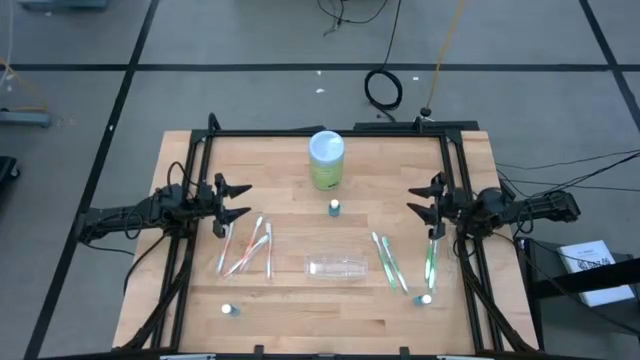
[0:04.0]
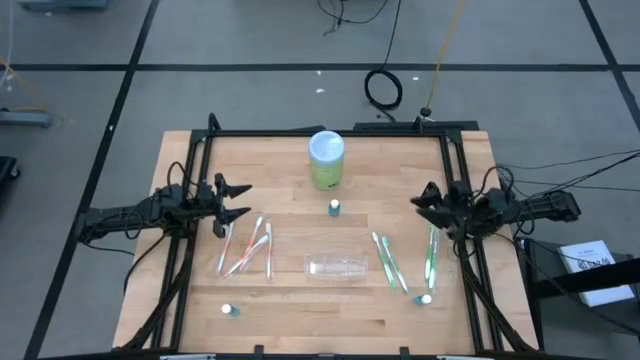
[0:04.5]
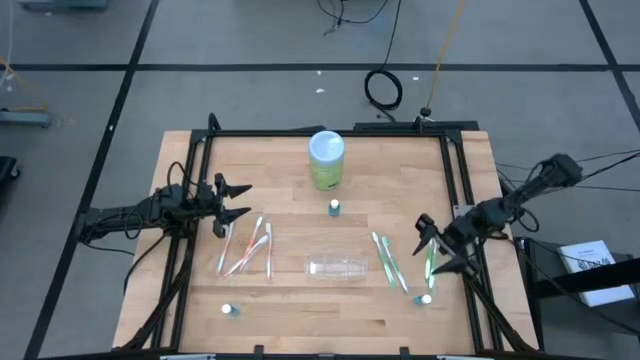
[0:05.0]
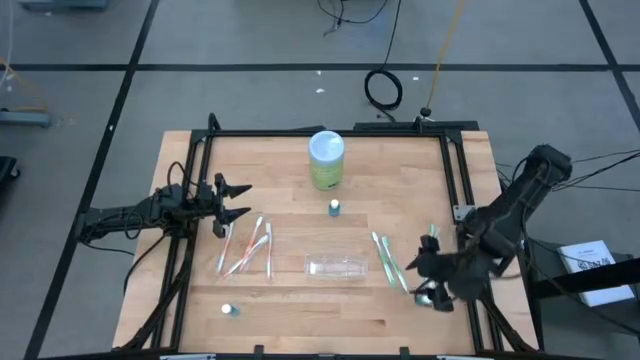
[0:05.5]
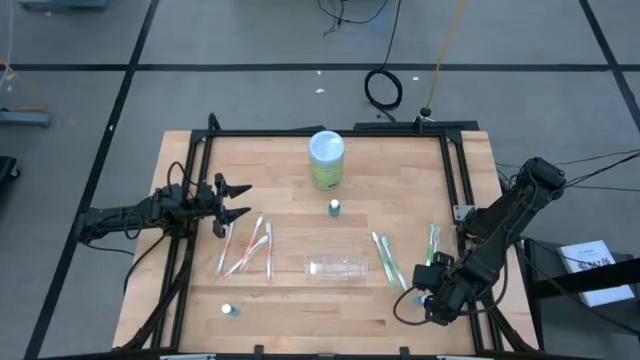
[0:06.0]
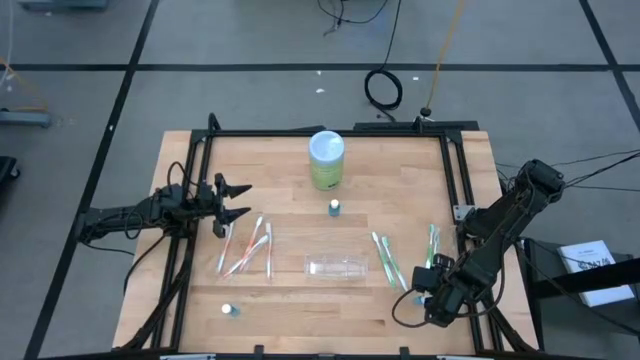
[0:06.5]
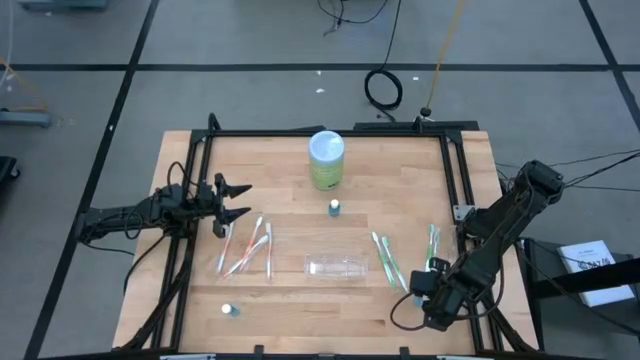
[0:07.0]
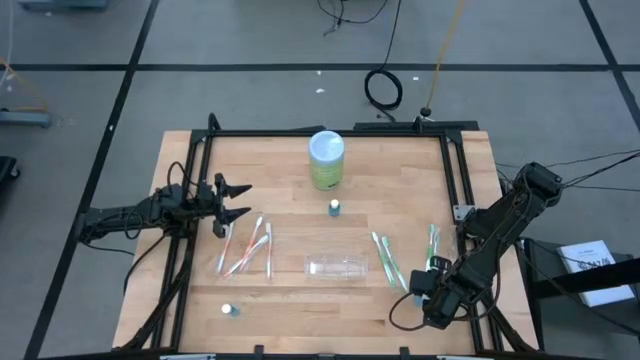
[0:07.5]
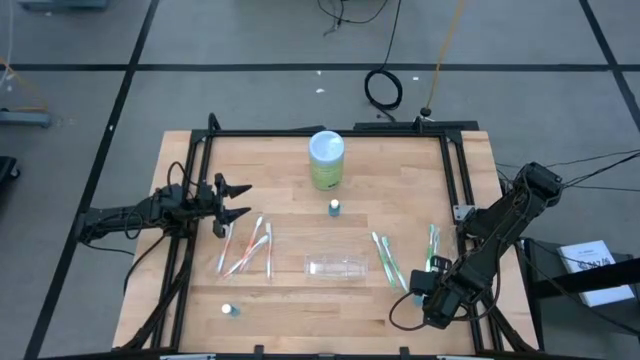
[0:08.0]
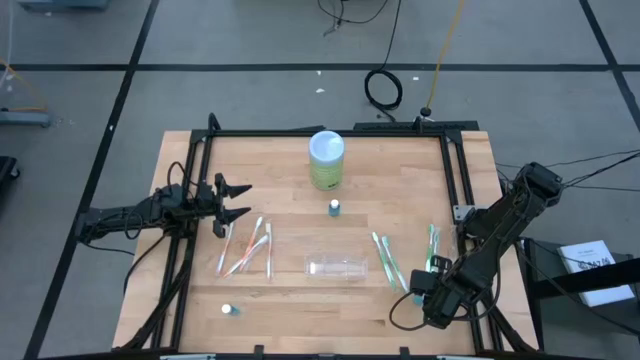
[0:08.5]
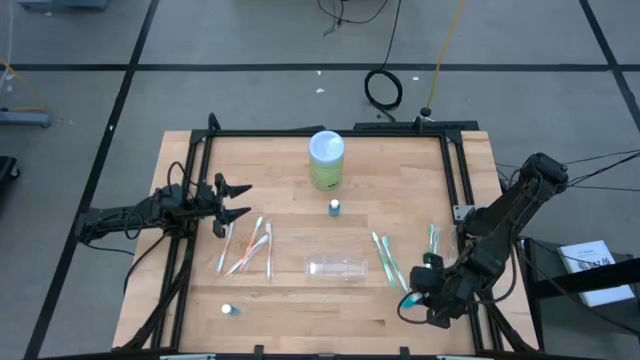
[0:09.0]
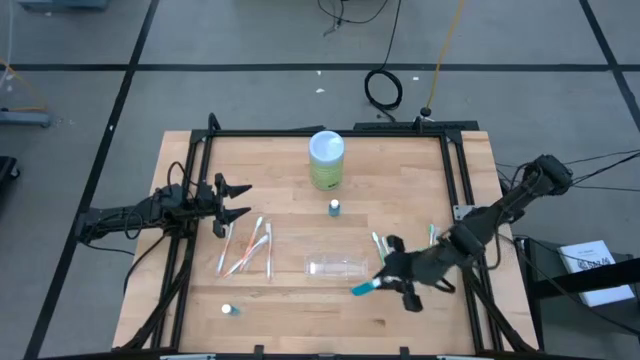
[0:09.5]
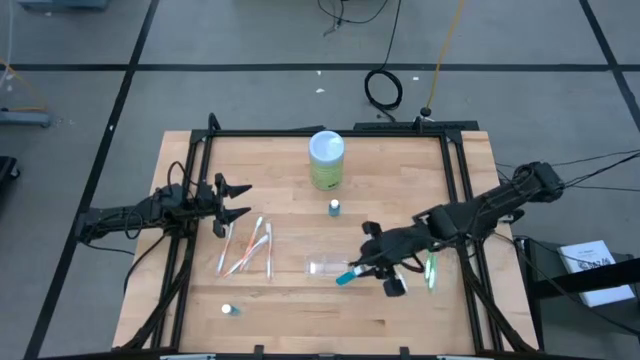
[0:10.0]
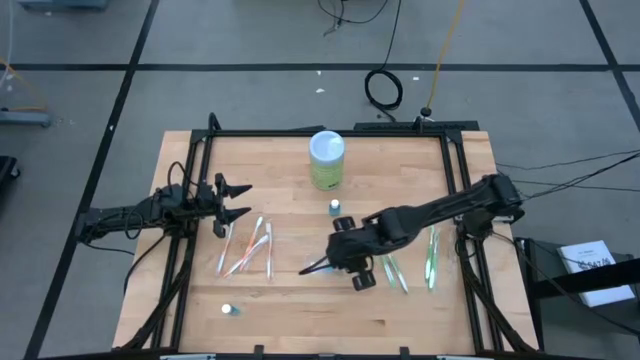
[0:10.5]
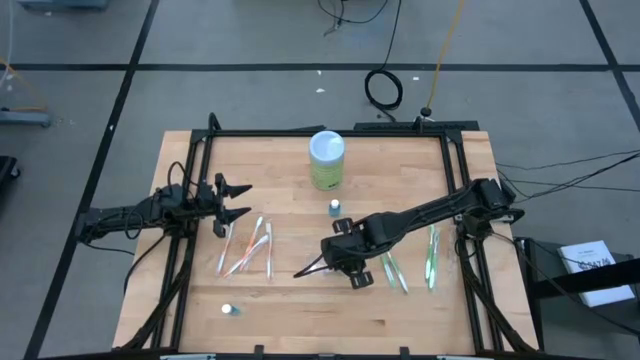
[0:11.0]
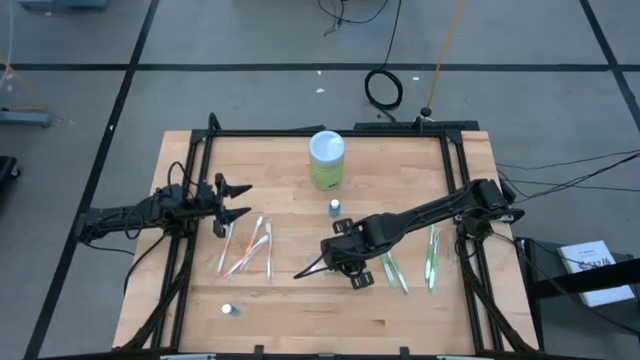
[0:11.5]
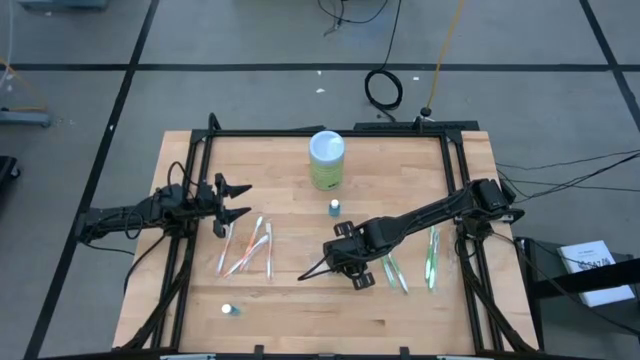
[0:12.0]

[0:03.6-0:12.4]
Task: Pick & Place toothbrushing station
Put the mouthwash into the middle center of the transparent organizer

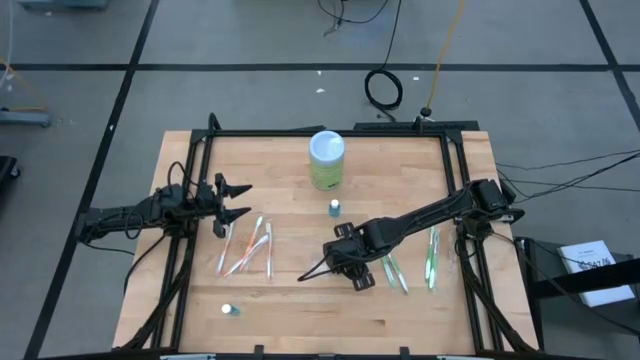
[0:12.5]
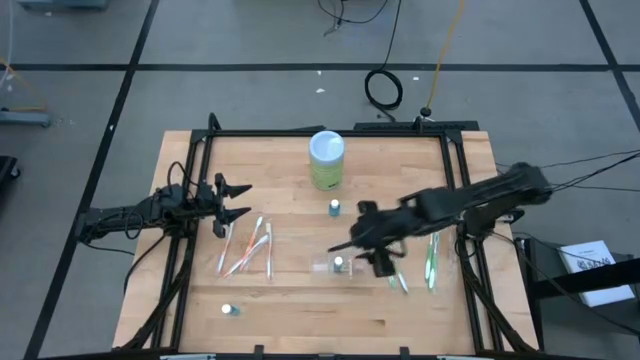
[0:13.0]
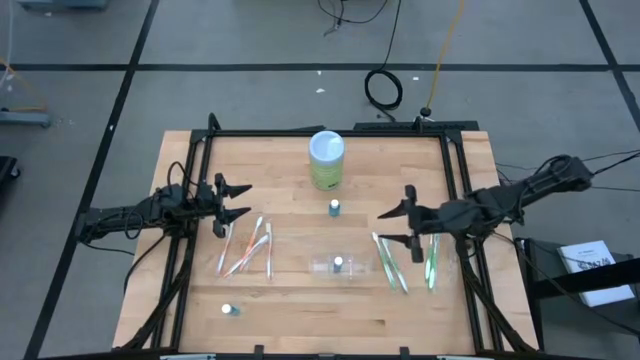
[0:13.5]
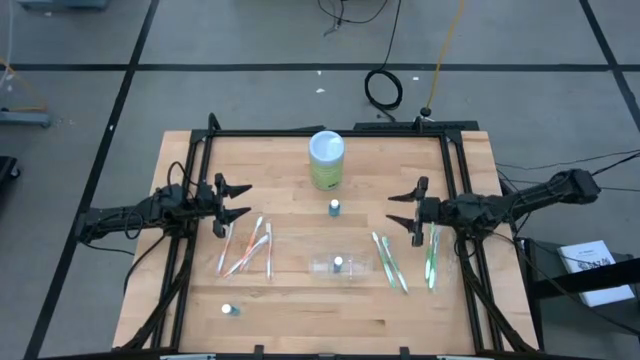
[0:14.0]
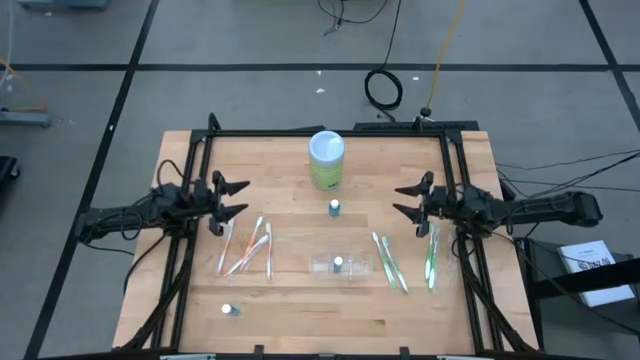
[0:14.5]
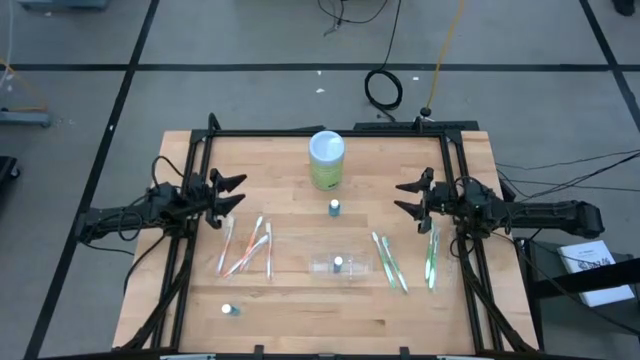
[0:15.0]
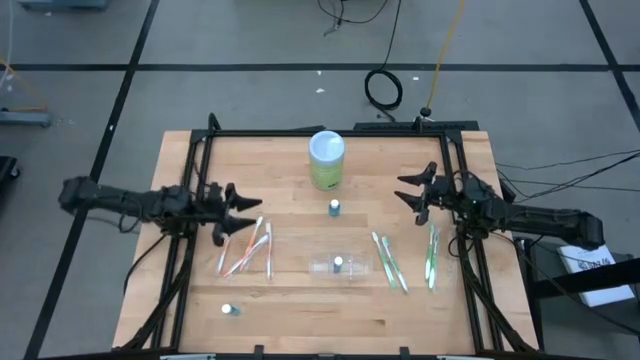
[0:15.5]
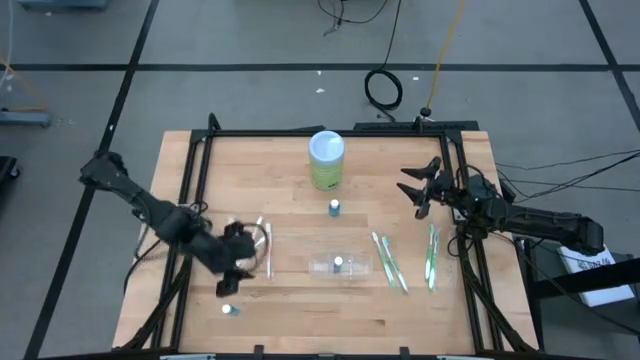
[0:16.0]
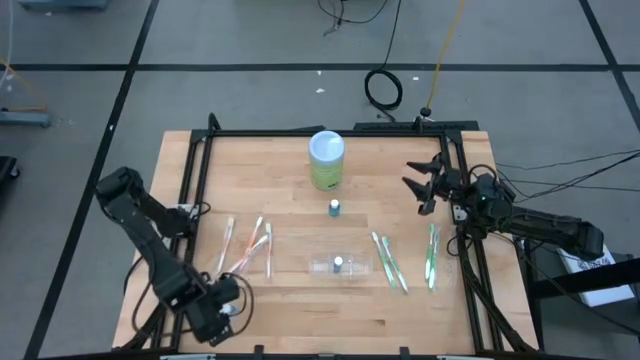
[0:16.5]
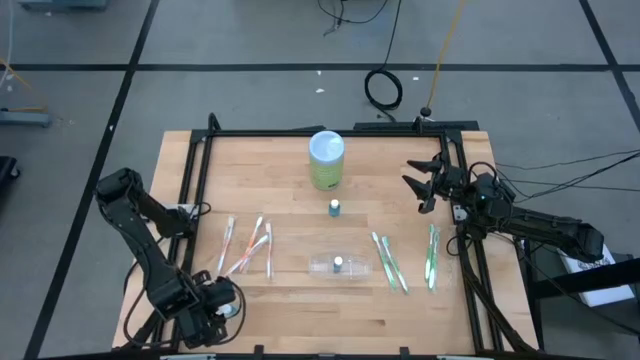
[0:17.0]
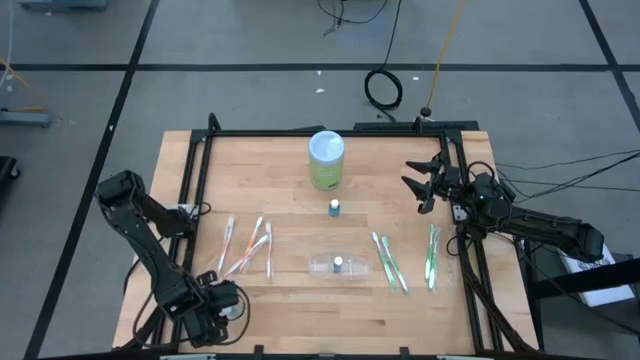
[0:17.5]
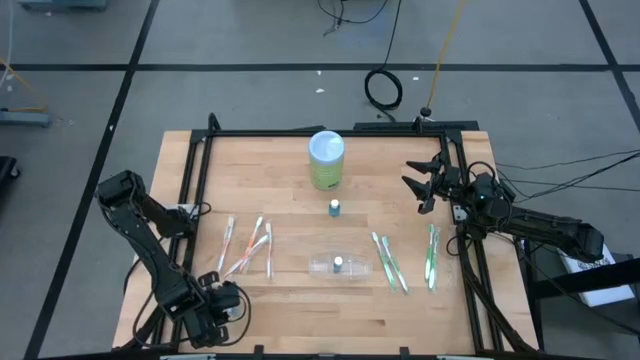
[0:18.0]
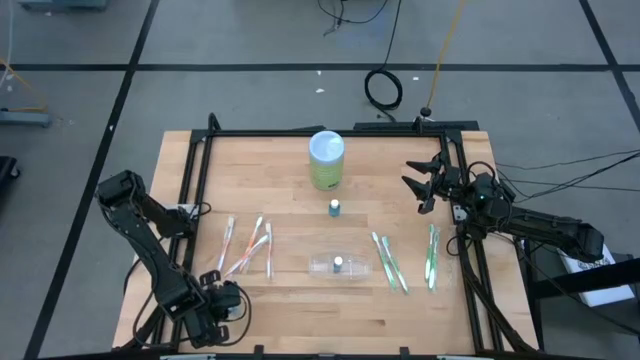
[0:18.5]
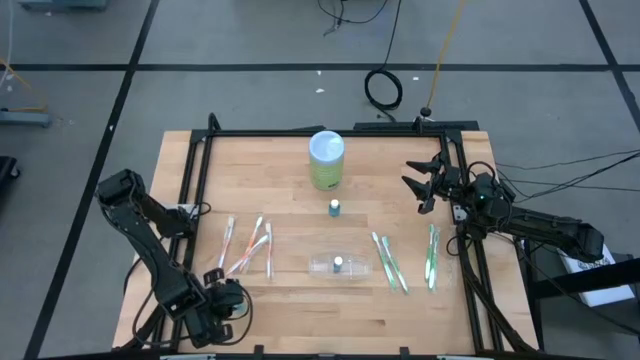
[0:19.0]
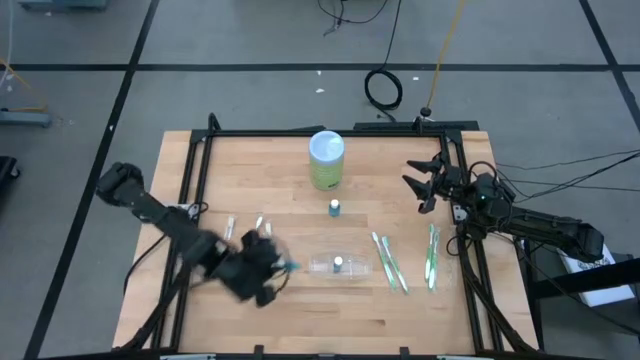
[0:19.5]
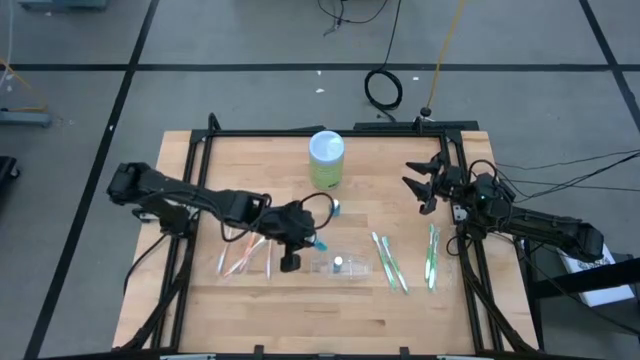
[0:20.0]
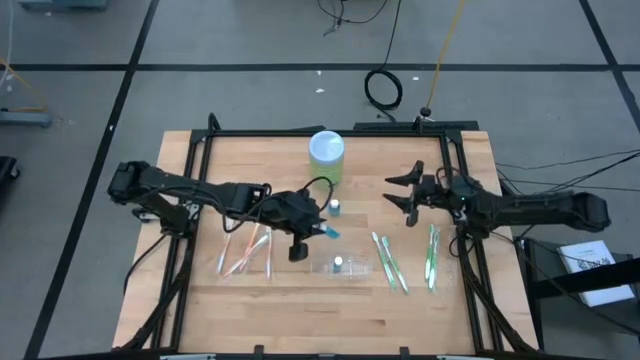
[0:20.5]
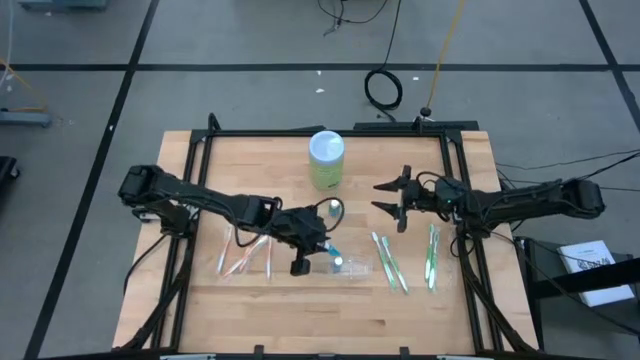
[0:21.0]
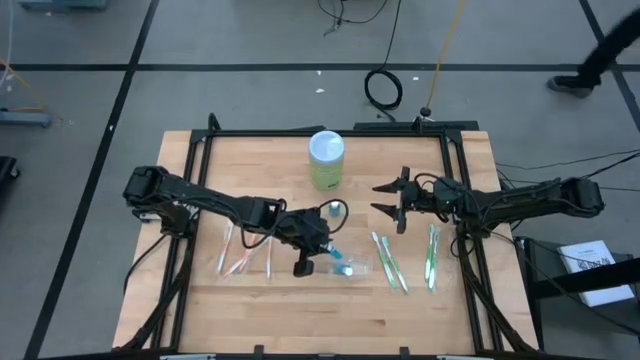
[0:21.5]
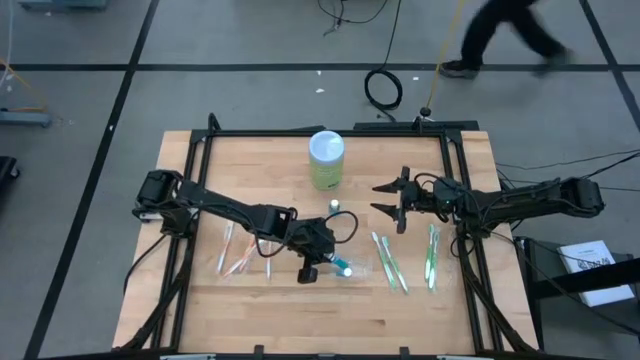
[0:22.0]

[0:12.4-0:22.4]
Put the mouthwash into the middle center of the transparent organizer

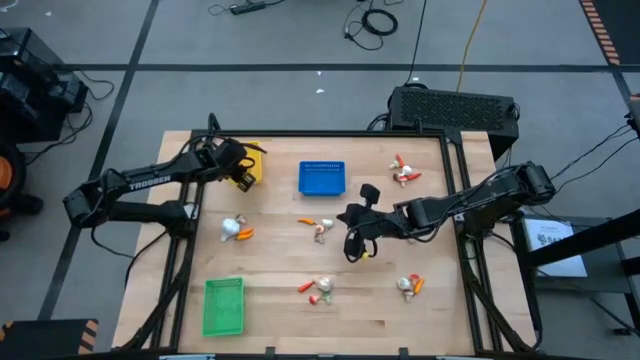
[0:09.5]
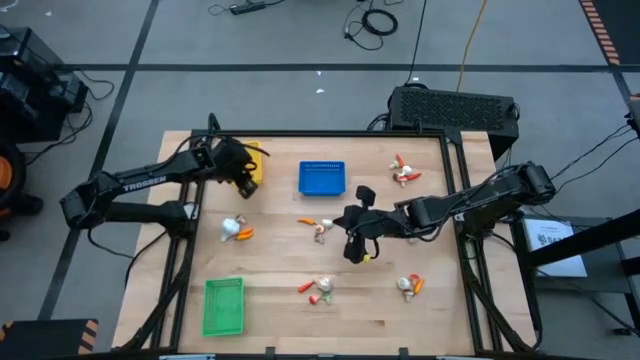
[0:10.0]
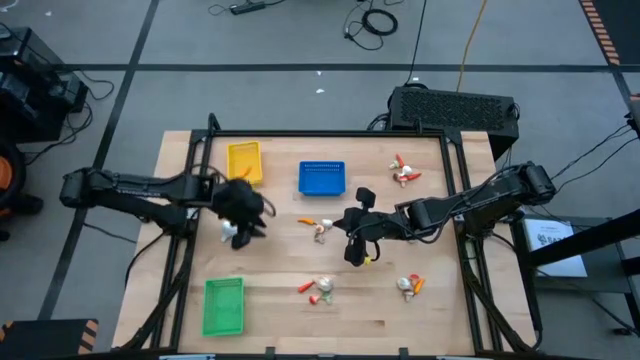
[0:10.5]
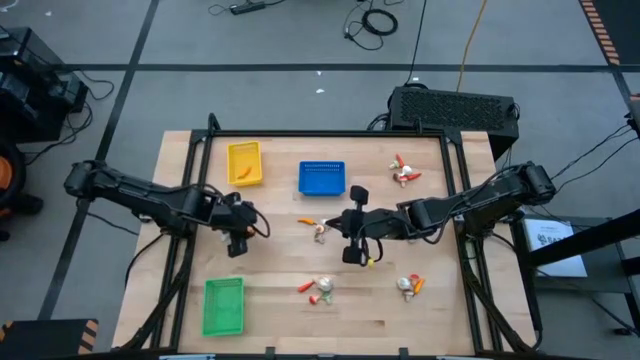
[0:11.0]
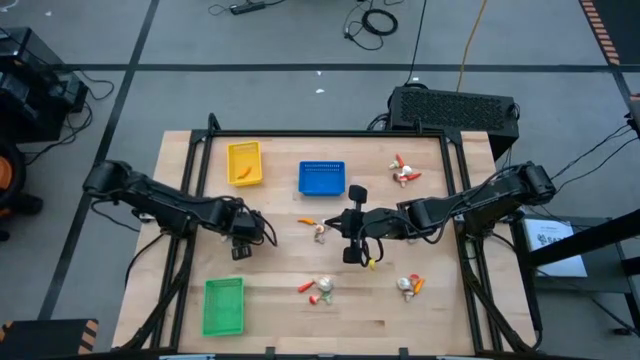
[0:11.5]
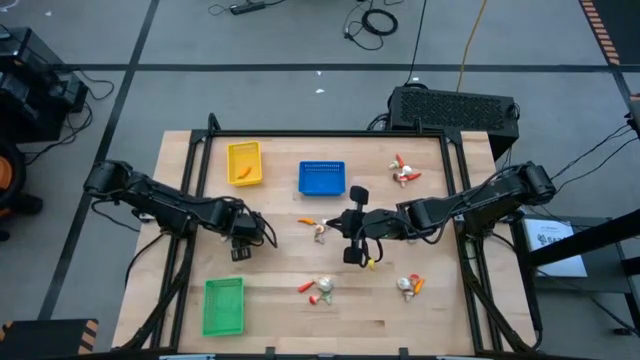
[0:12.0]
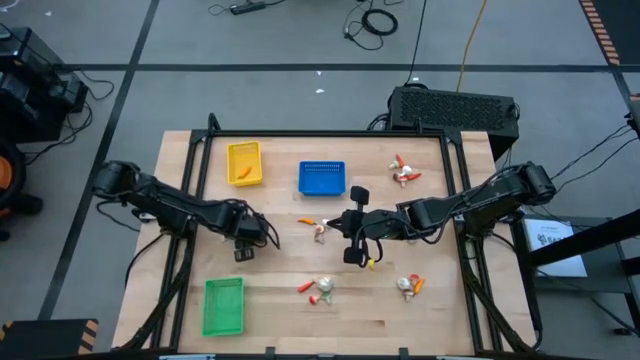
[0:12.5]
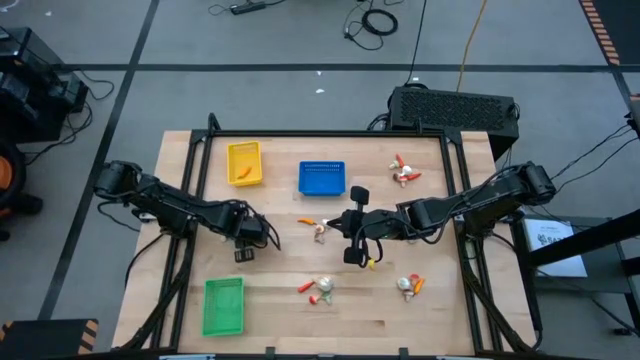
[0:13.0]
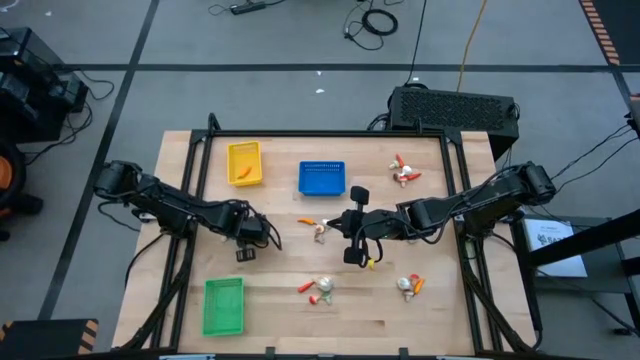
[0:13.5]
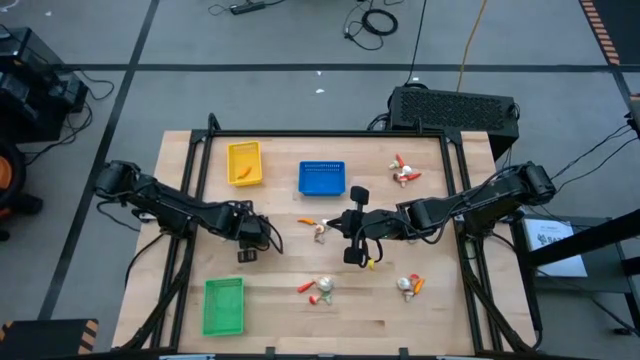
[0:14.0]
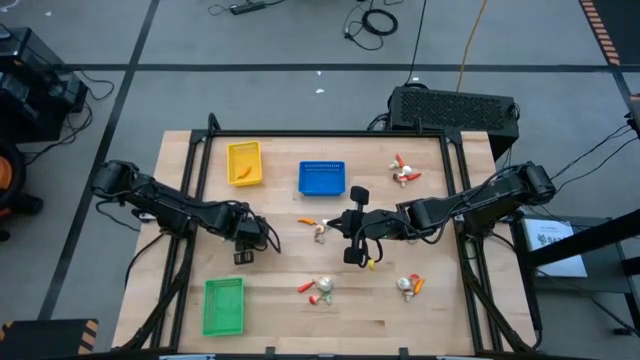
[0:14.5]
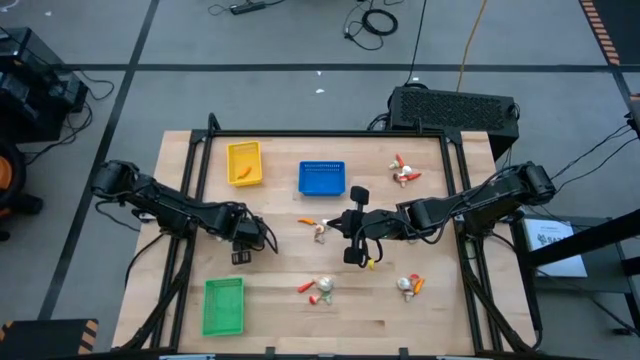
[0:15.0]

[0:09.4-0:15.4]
Task: Sort produce into baskets
Put the yellow chili pepper into the yellow bin
